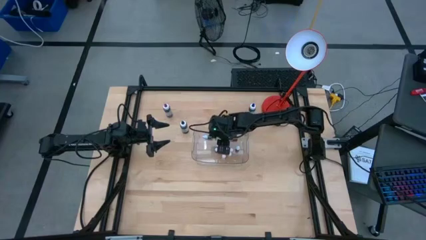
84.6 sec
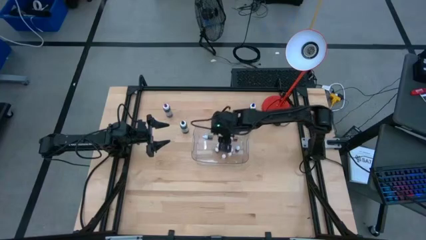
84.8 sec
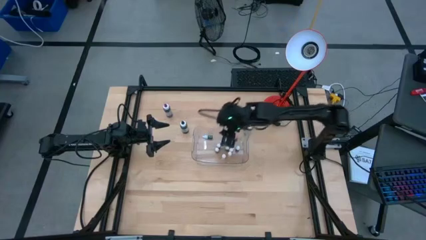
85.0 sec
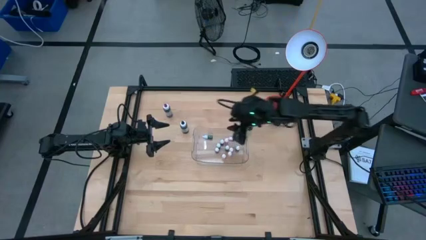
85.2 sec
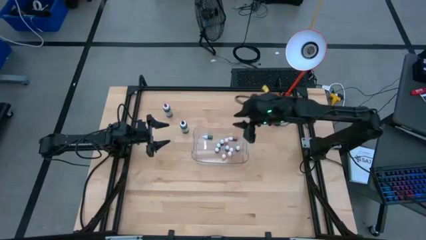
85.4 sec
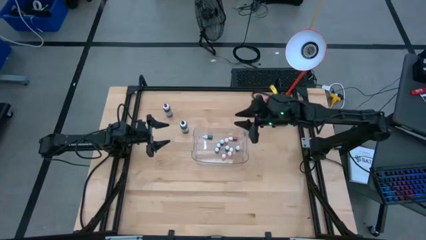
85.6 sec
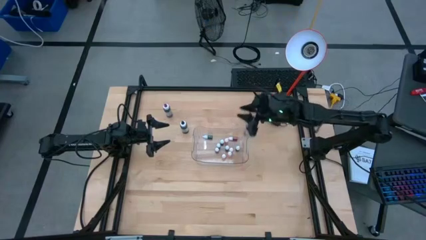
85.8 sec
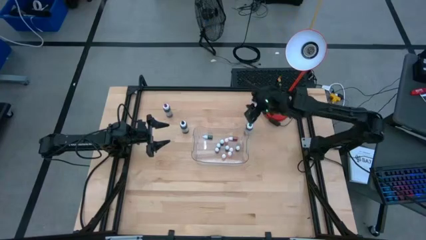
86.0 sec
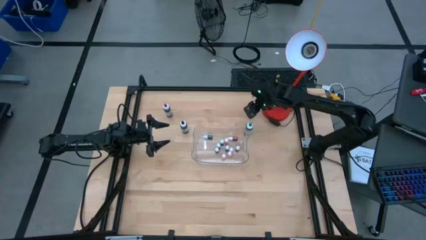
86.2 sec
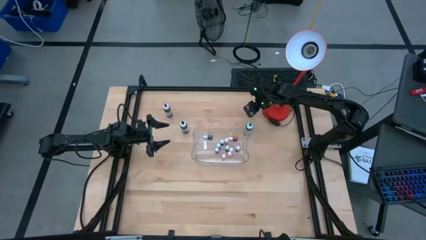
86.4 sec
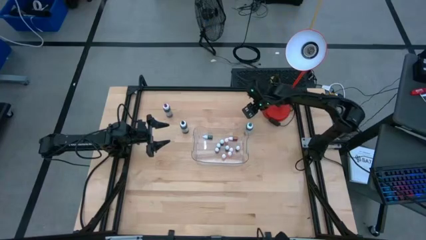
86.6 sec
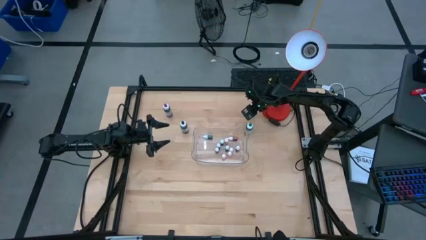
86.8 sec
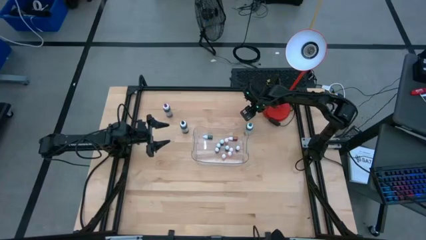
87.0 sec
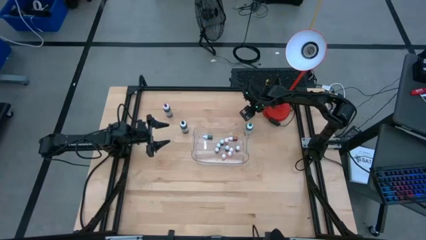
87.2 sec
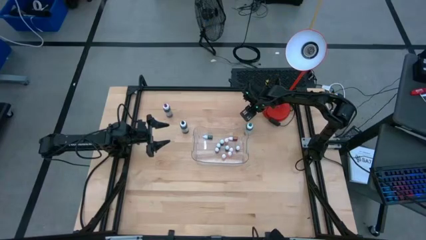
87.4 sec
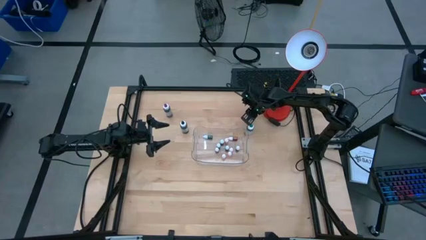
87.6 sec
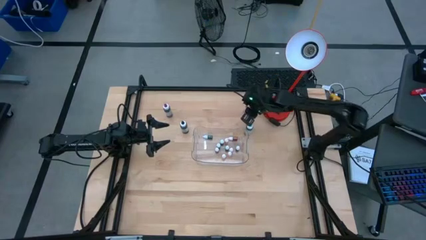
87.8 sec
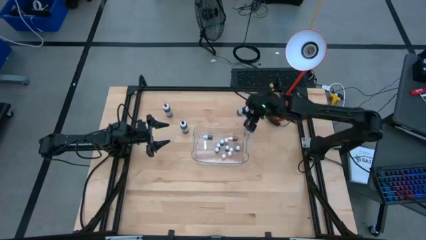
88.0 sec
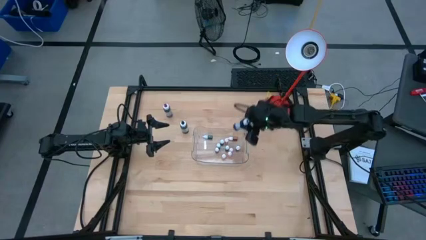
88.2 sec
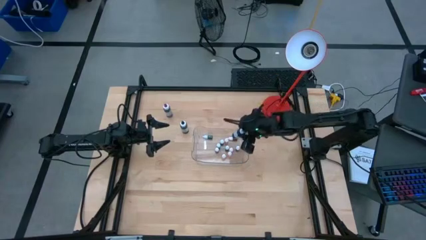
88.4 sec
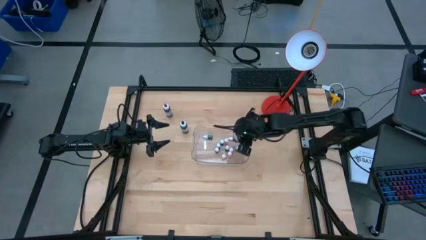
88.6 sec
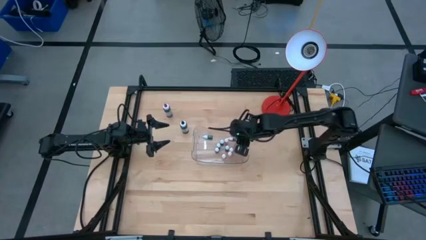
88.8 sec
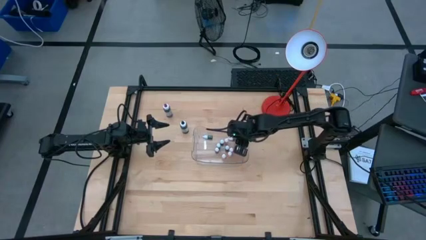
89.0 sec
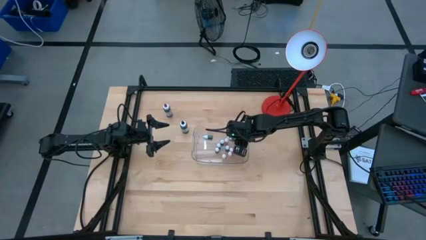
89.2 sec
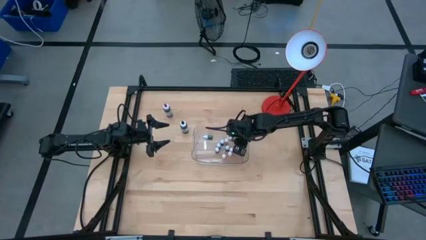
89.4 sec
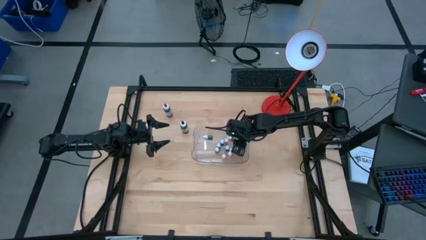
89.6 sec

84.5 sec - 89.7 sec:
Task: Pick & Place food coloring
Put the blue food coloring bottle into the transparent bin

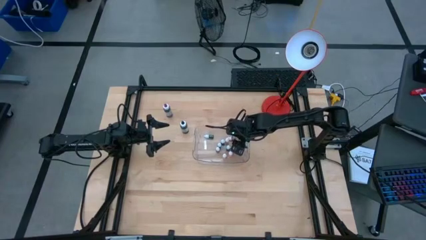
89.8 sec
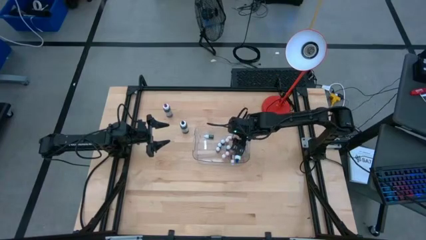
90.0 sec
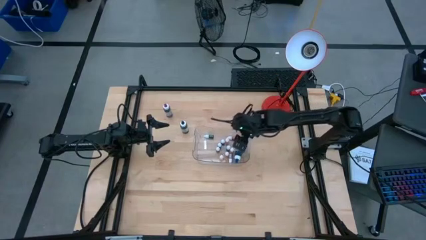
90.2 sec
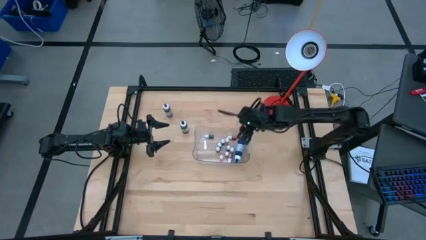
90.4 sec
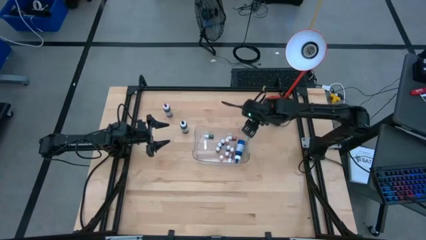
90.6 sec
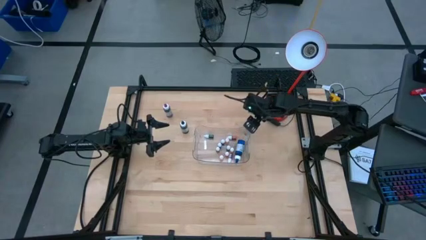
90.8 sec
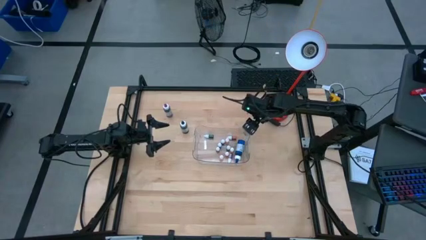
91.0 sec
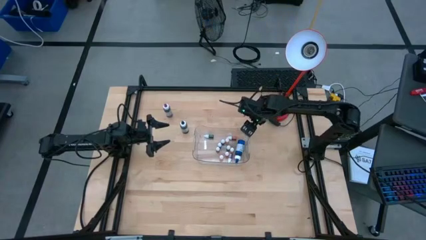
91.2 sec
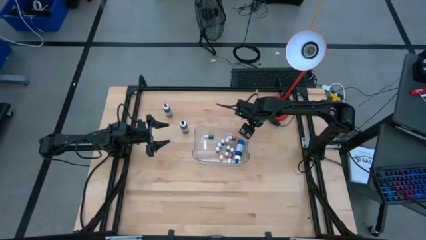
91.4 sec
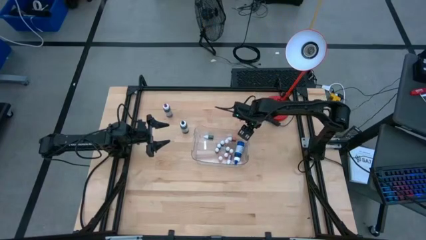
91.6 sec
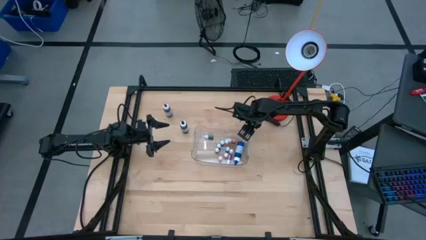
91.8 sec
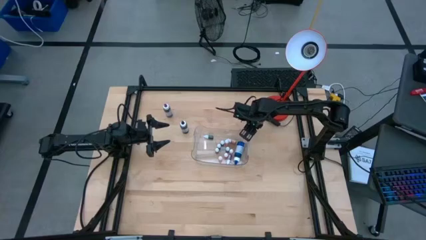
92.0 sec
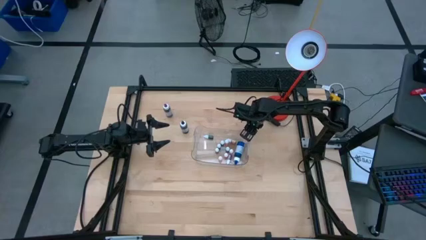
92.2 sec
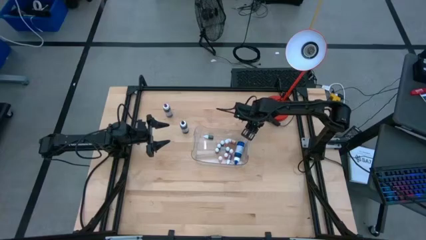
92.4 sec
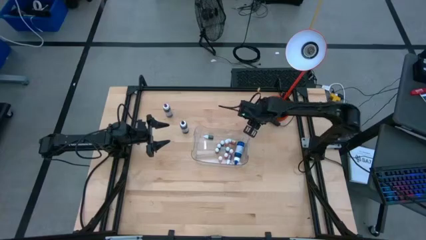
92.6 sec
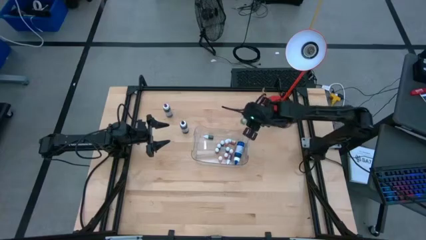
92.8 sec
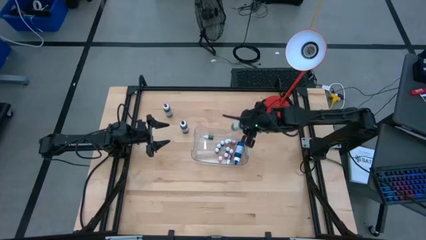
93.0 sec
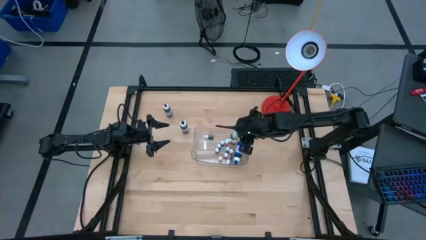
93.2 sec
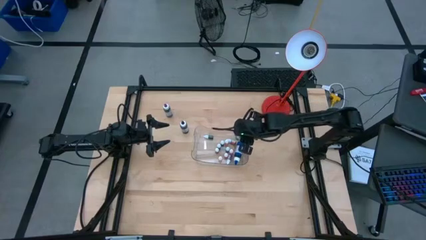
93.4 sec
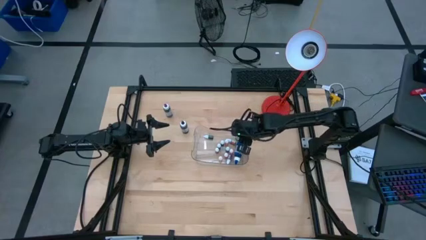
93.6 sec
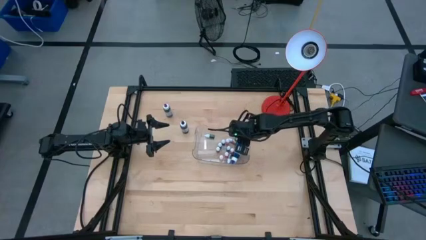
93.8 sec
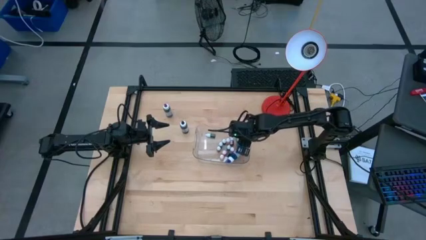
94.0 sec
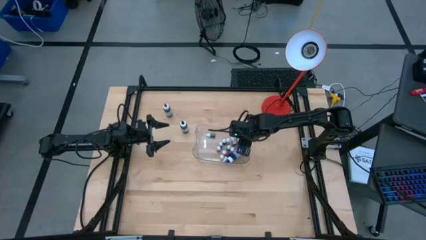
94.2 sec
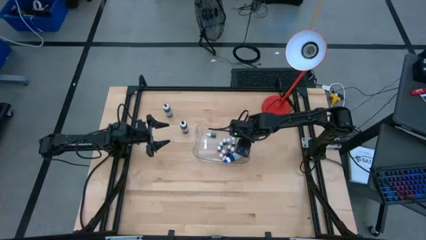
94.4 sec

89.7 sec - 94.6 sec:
Put the large green food coloring bottle into the transparent bin

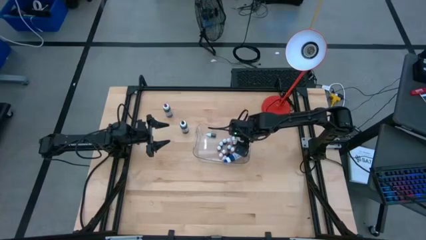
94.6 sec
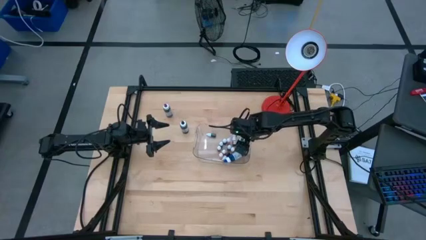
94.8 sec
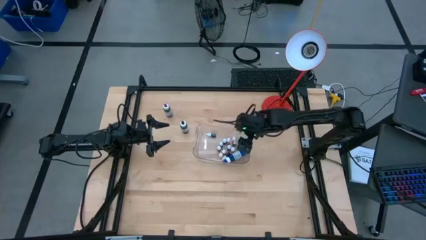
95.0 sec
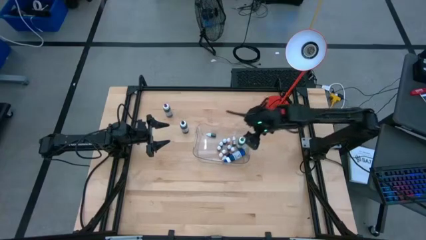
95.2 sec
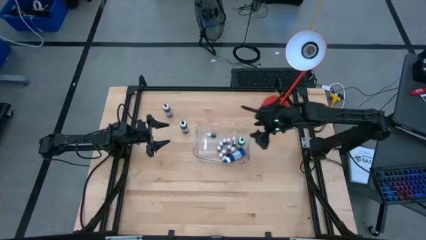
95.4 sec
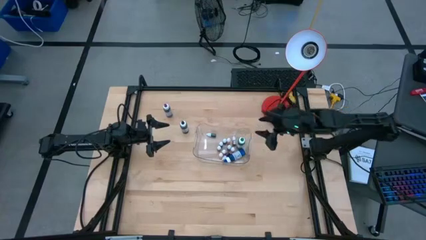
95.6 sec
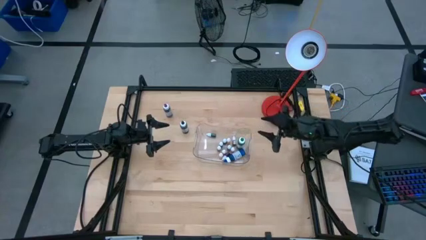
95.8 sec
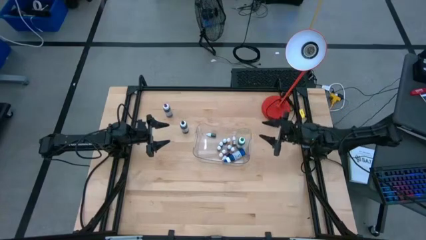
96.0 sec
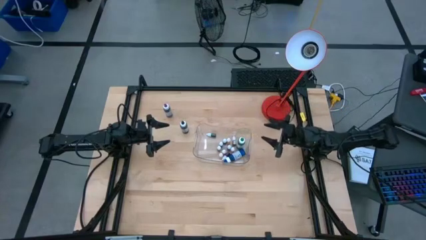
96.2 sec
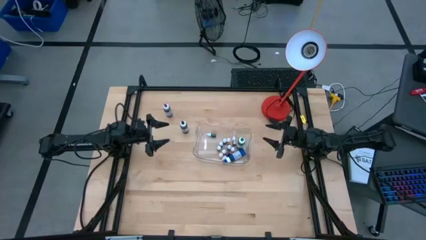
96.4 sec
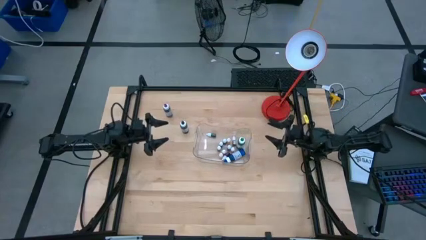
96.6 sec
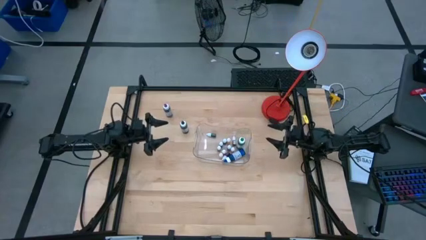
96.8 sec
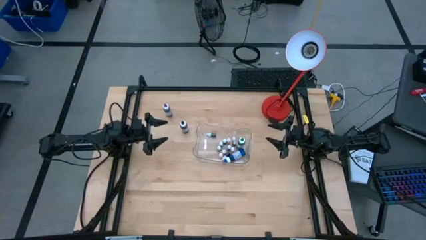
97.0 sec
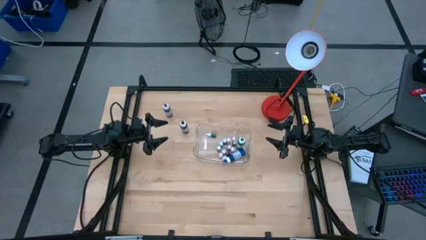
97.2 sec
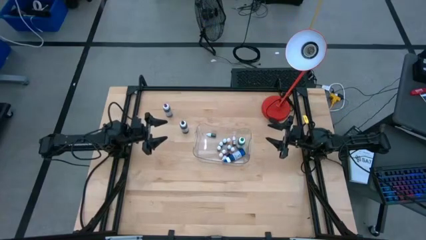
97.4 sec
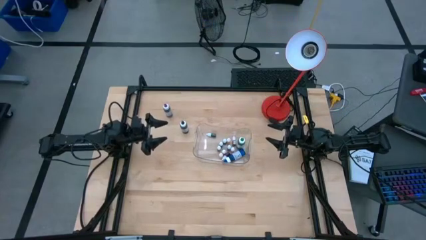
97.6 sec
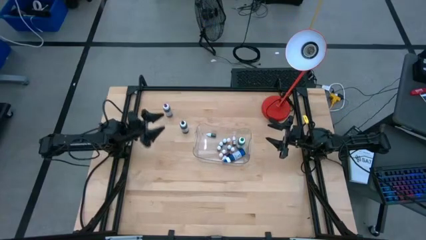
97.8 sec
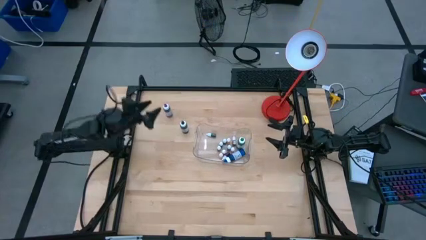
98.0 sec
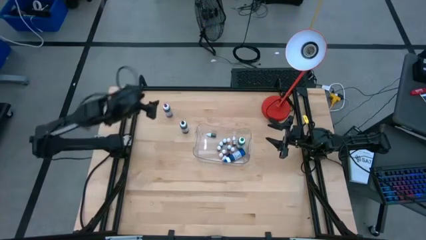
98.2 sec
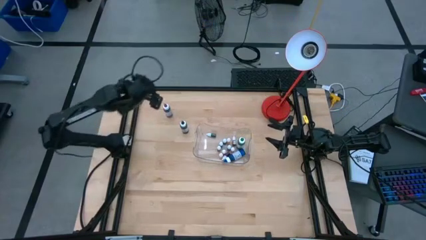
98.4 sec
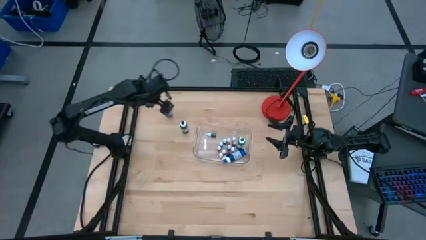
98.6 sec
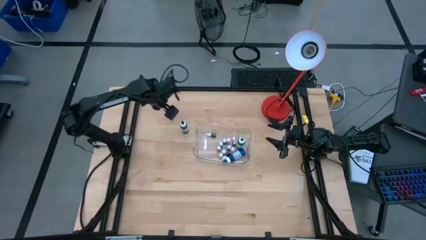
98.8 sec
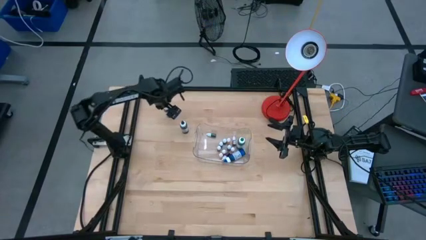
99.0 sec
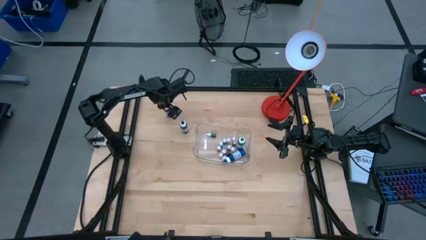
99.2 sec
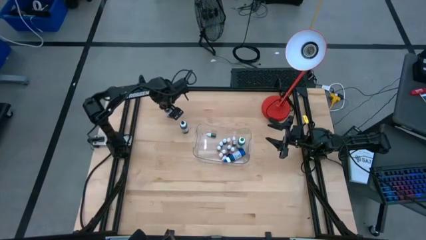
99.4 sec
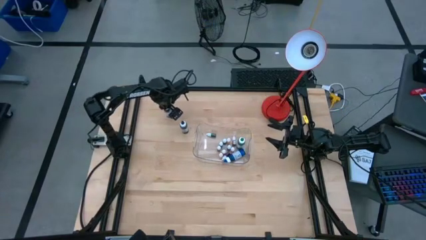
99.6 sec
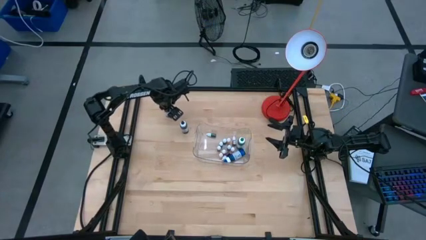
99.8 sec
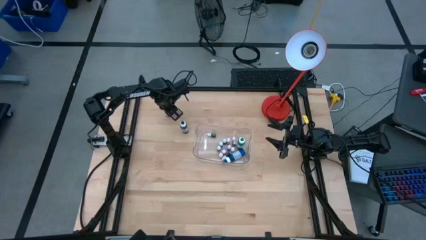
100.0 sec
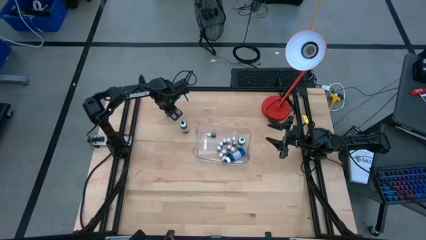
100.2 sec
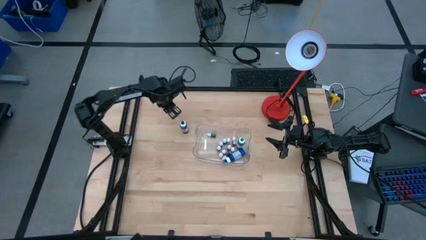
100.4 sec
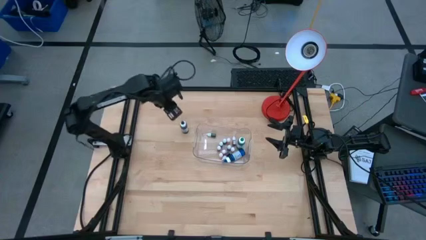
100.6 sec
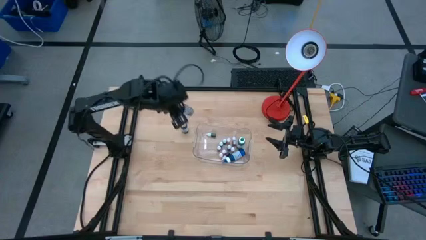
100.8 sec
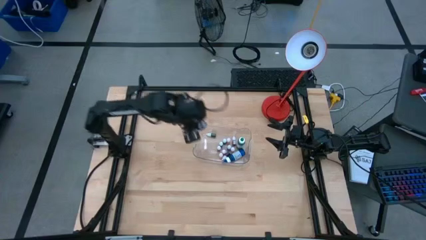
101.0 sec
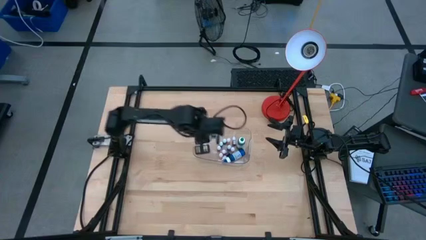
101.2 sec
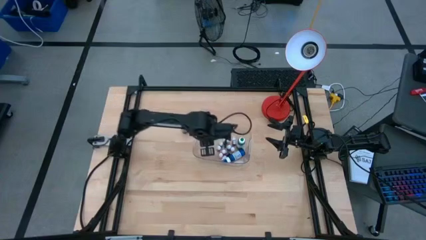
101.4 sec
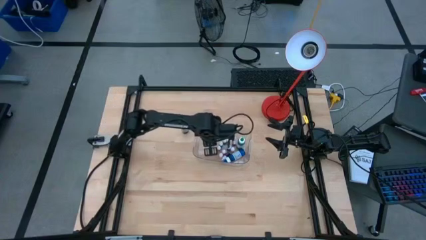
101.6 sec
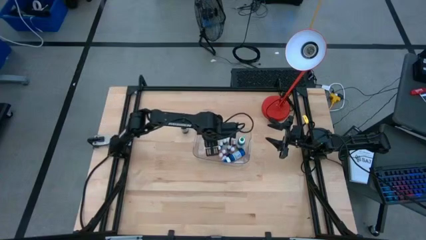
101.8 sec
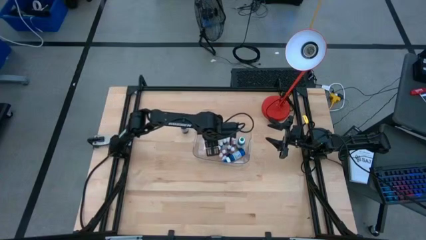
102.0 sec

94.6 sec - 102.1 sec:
Put the purple food coloring bottle into the transparent bin
